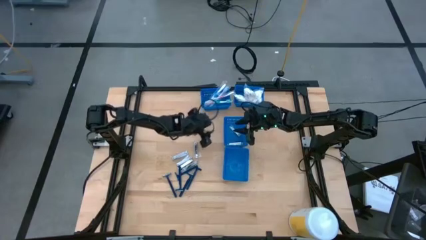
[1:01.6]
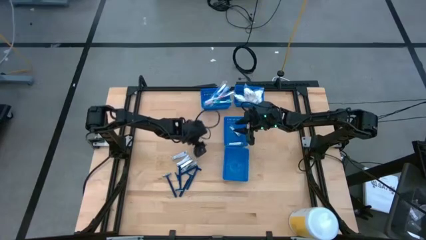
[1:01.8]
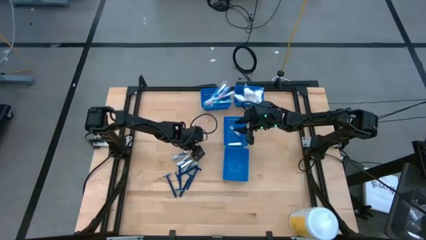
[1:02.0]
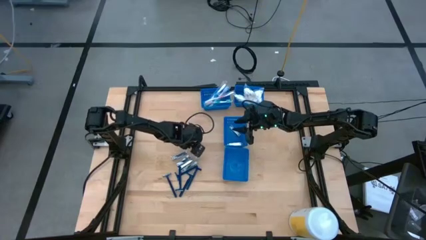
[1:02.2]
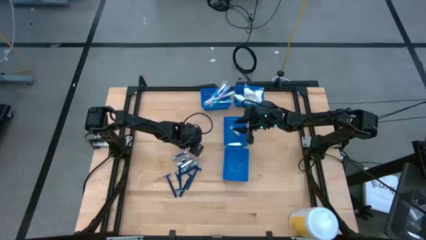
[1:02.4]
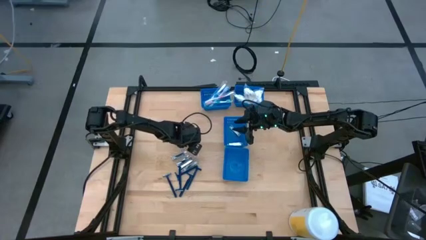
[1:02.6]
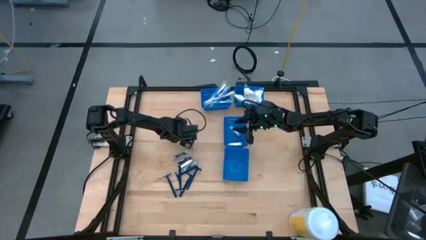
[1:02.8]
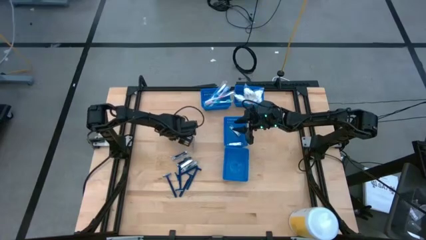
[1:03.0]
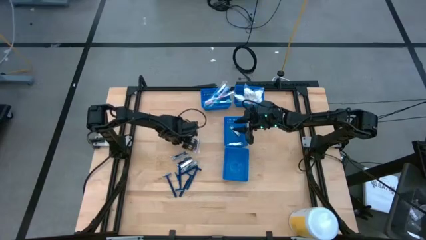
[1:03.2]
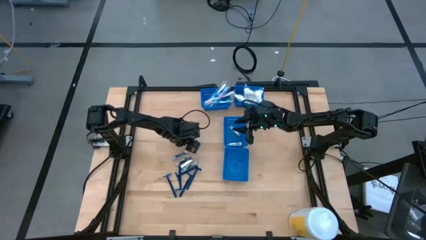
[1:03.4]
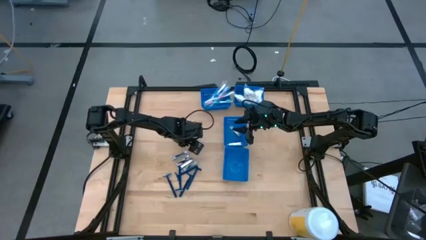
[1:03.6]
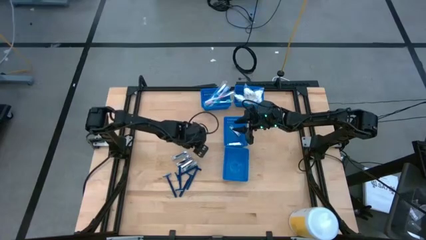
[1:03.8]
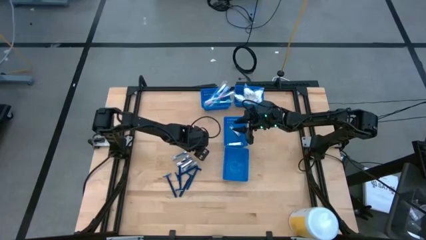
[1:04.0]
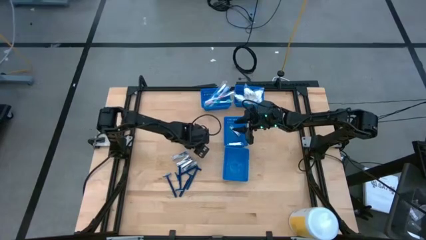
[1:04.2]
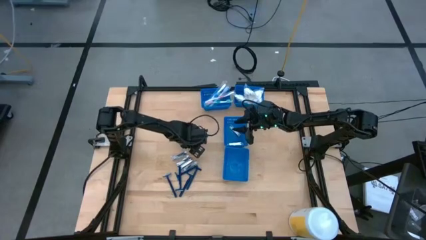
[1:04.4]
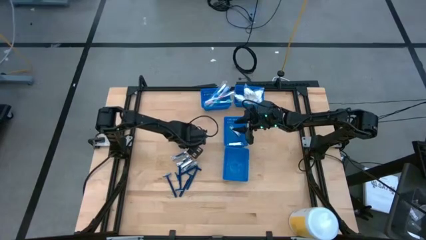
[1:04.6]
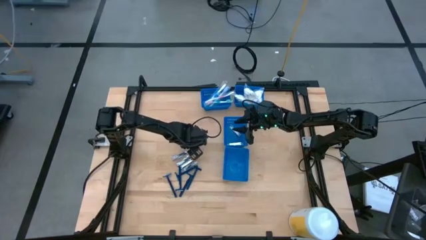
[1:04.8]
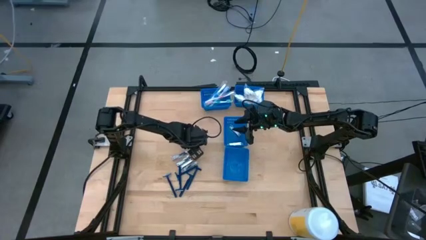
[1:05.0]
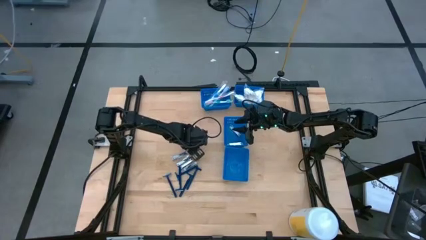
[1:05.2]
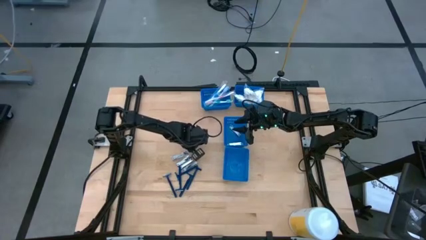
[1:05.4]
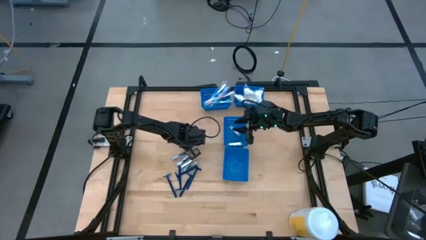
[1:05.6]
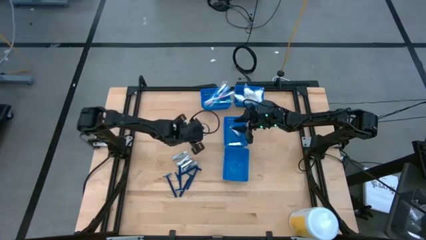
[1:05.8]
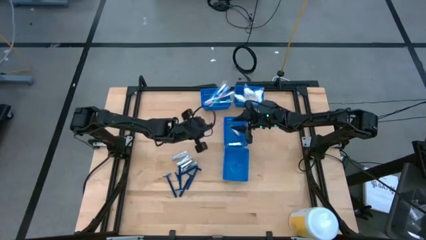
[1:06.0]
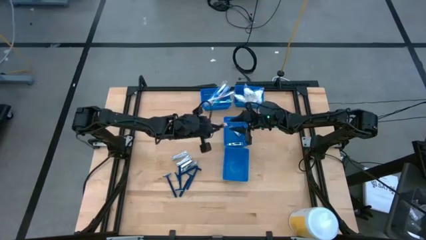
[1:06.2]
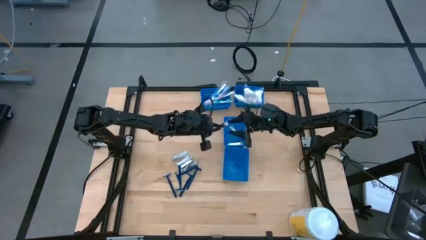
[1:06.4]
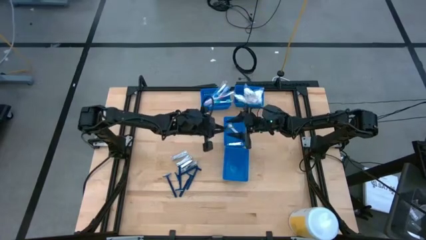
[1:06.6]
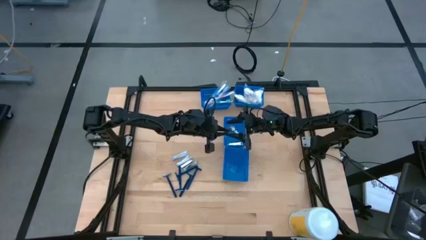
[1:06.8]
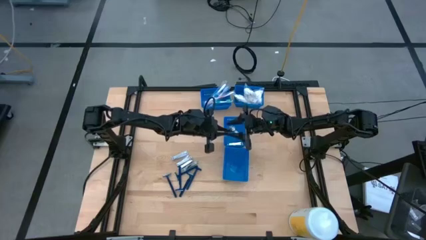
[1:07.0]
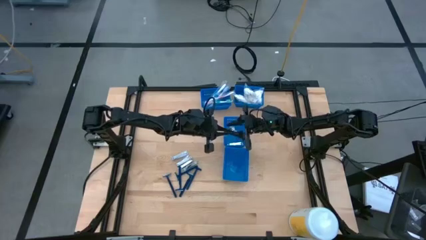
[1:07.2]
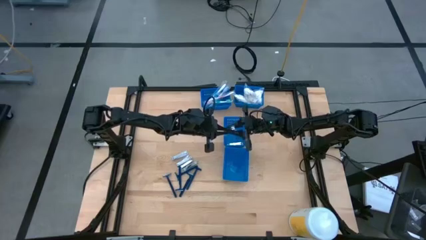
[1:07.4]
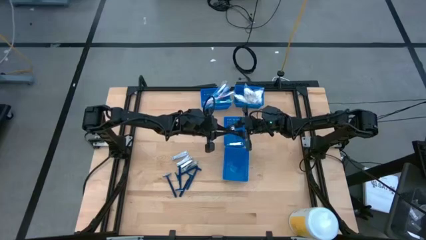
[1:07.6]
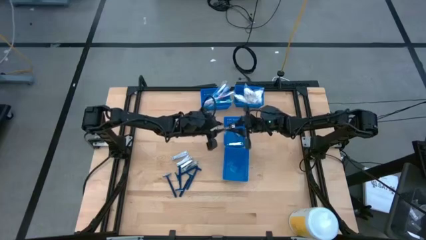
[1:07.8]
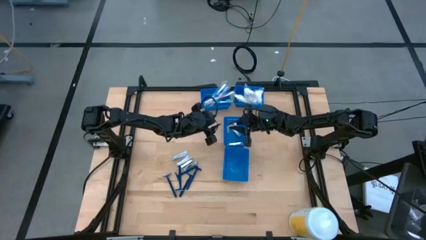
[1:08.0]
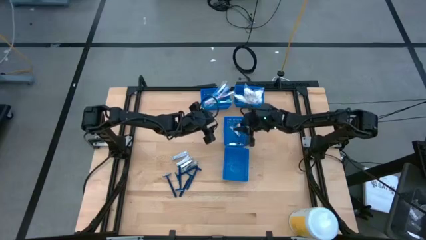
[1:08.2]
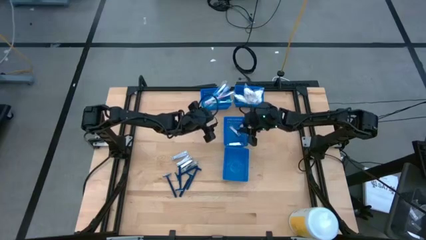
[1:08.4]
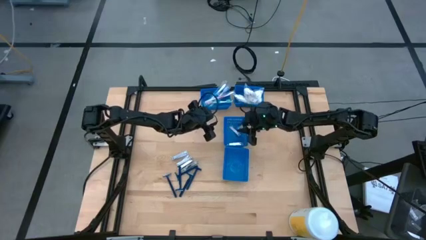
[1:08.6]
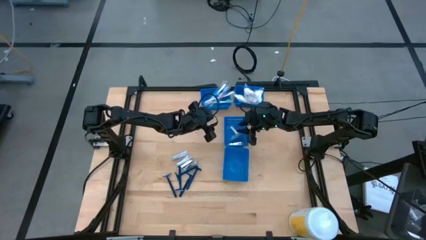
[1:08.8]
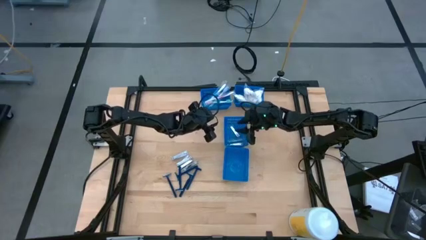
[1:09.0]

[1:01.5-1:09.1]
Task: Pick & Place Travel size toiletries
Put the nail clipper into the center blue bin

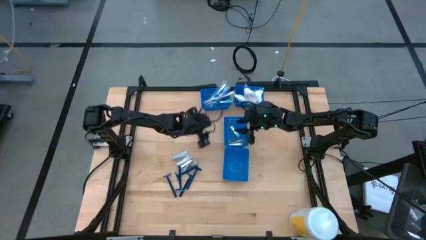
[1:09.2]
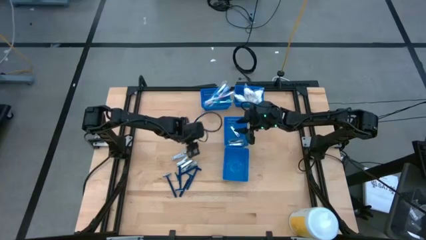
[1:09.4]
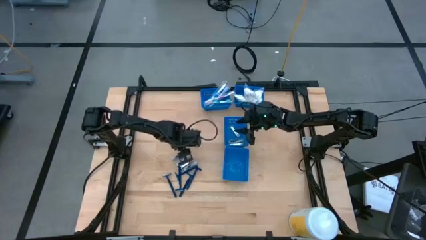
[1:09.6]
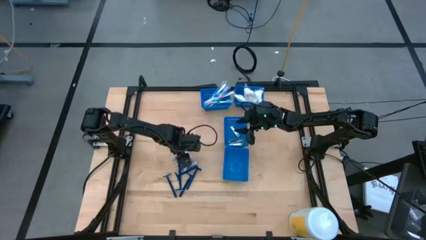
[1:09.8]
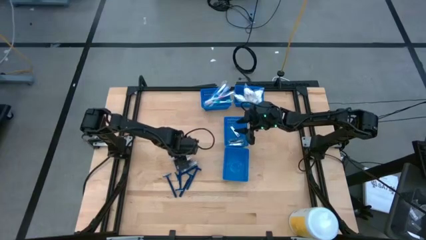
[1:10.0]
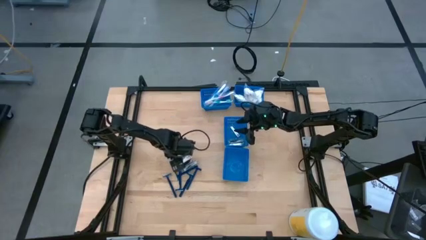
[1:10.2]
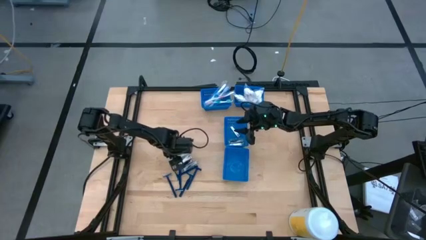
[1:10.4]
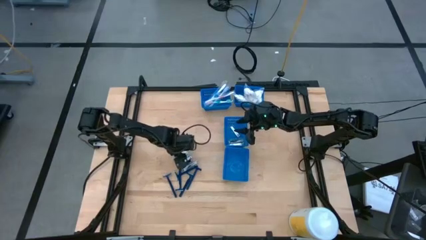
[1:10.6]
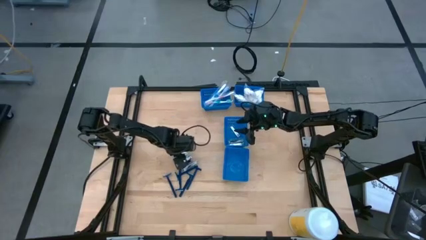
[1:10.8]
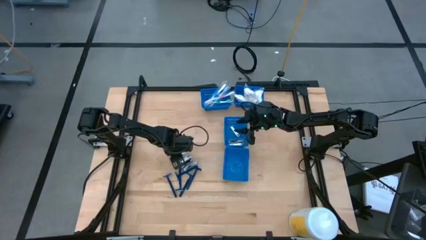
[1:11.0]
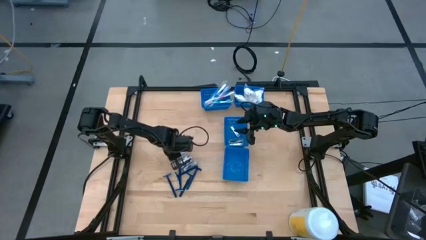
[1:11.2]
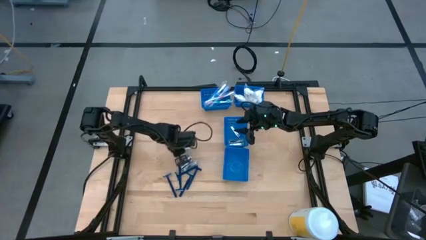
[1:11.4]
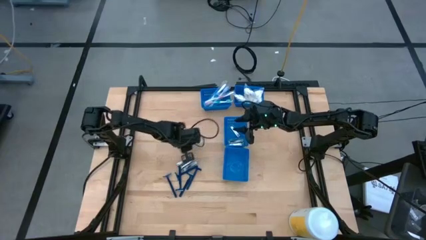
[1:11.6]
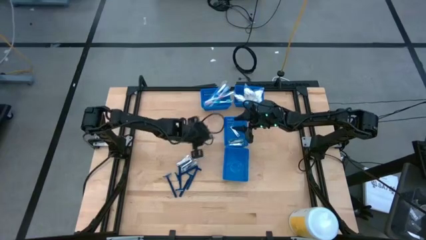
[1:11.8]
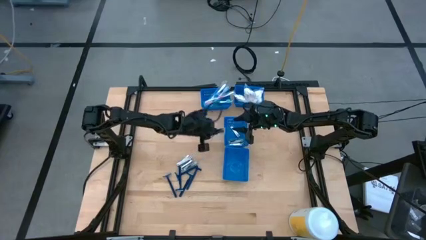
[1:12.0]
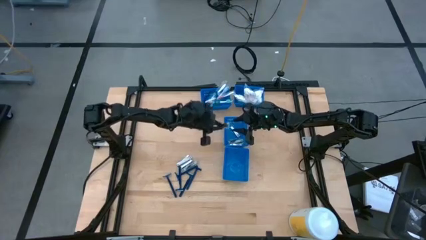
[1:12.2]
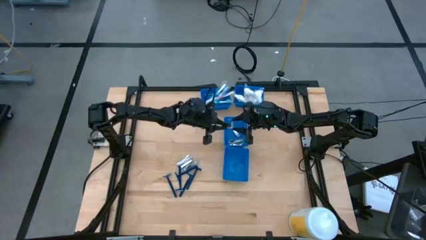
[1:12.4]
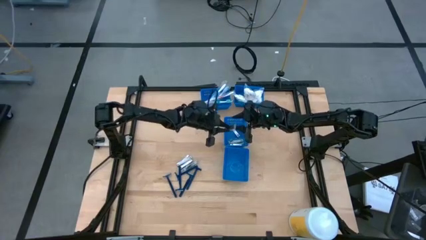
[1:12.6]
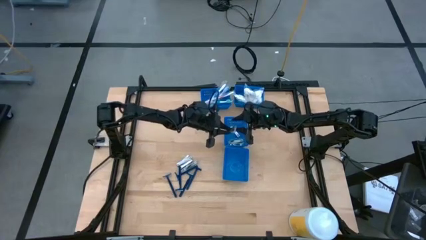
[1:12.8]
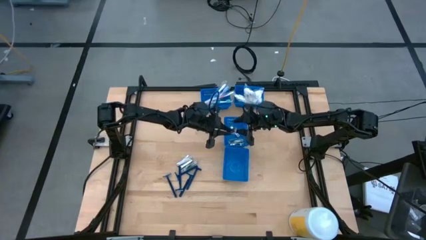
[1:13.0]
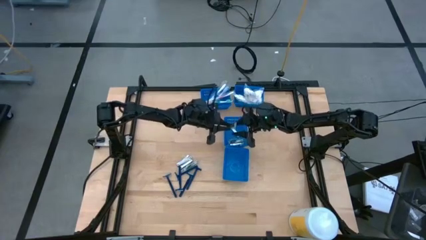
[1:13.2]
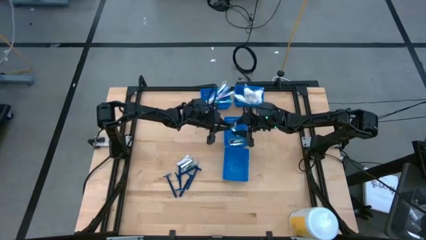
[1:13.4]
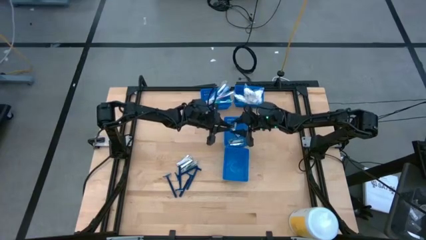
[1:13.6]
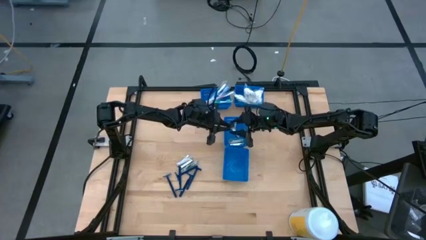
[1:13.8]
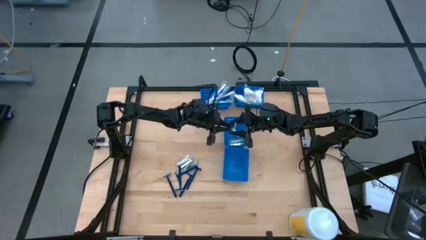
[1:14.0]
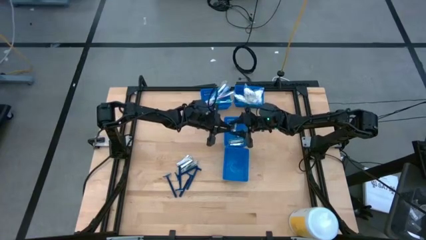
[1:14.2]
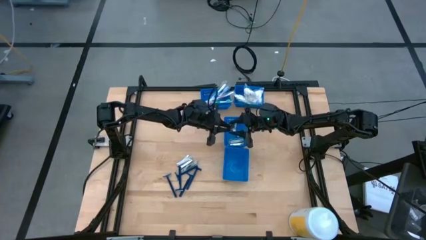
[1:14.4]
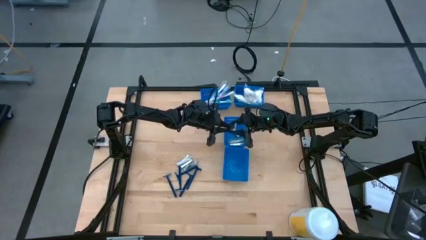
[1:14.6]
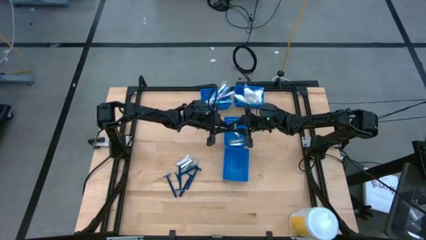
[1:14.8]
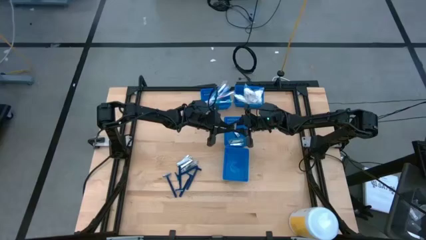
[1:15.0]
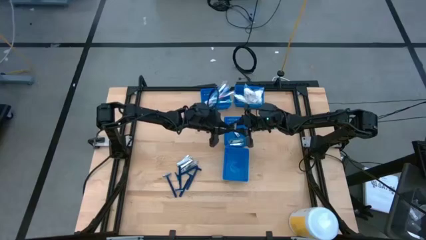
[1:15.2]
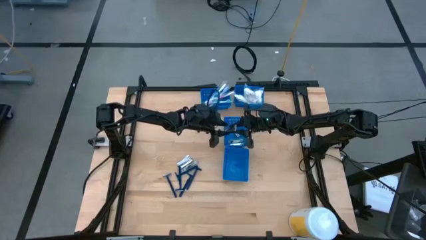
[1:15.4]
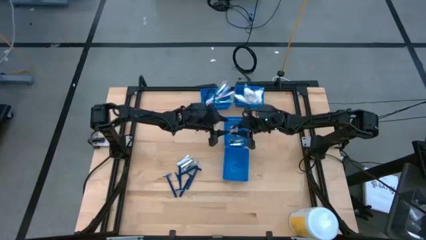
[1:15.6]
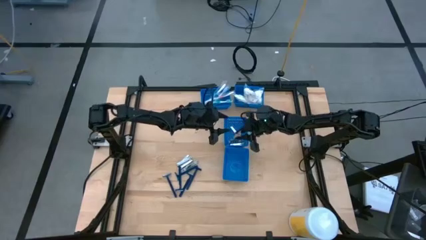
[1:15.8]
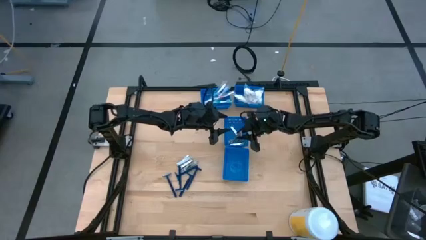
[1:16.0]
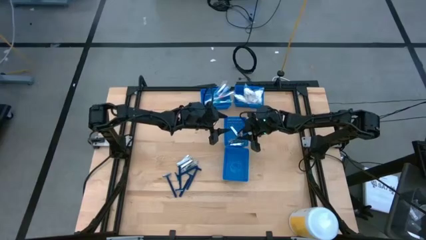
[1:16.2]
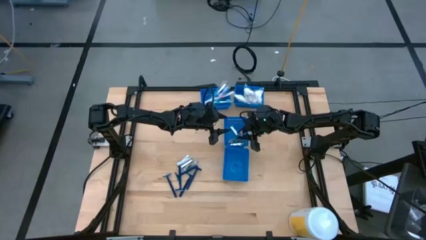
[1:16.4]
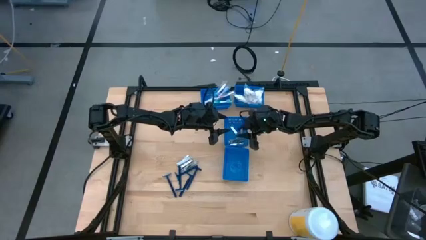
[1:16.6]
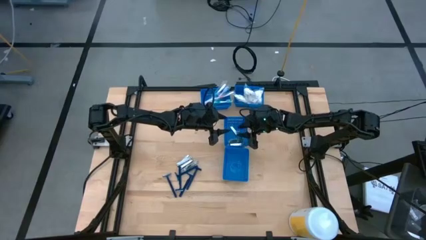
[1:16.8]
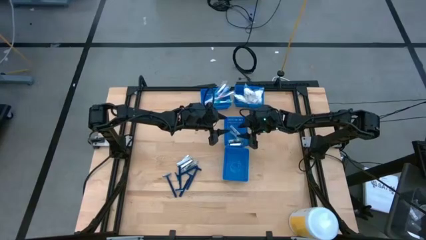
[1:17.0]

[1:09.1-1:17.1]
Put the nail clipper into the center blue bin

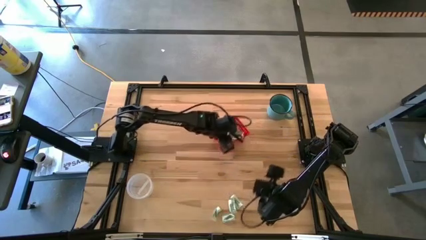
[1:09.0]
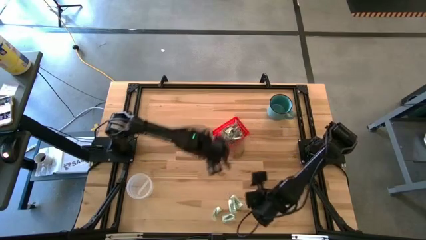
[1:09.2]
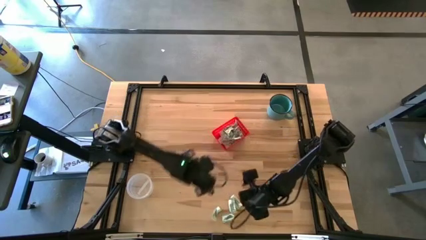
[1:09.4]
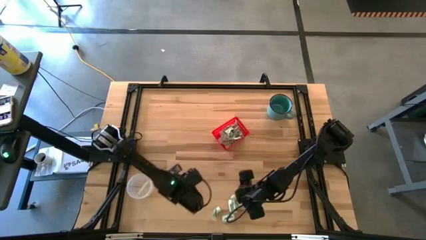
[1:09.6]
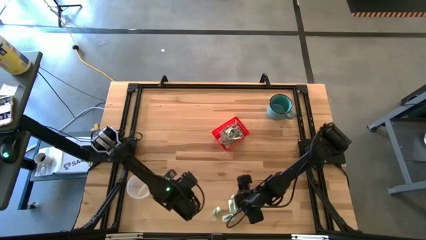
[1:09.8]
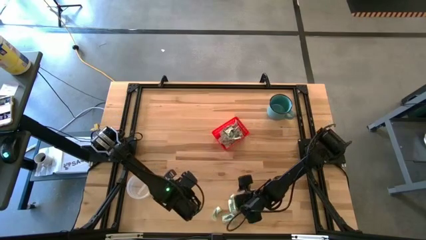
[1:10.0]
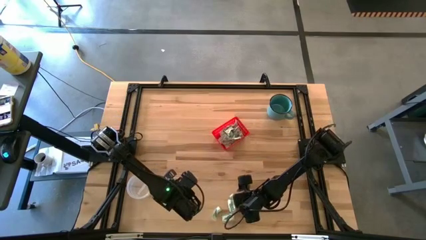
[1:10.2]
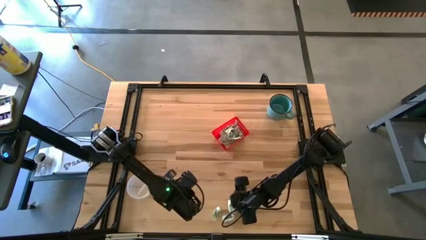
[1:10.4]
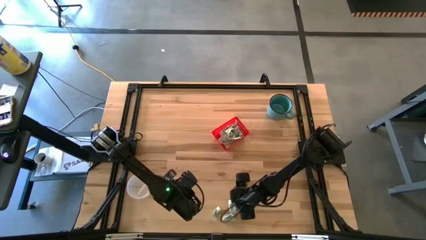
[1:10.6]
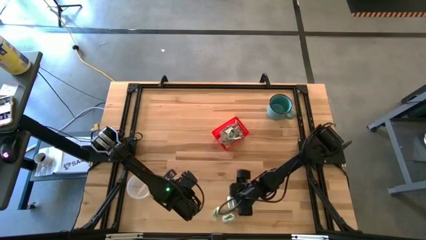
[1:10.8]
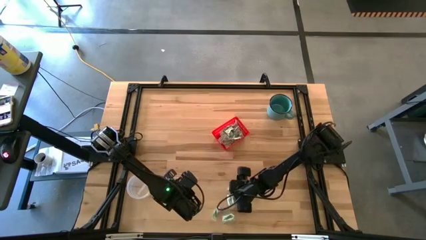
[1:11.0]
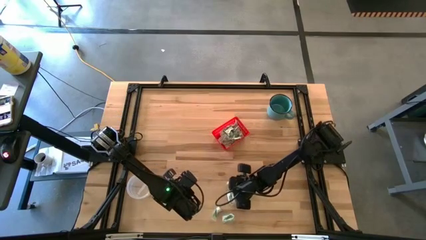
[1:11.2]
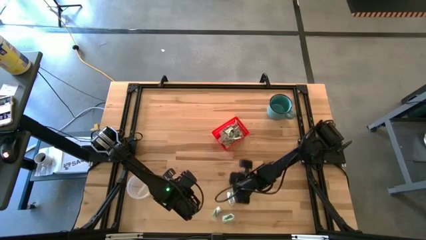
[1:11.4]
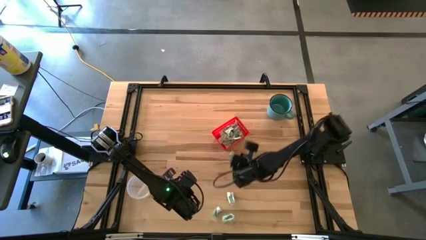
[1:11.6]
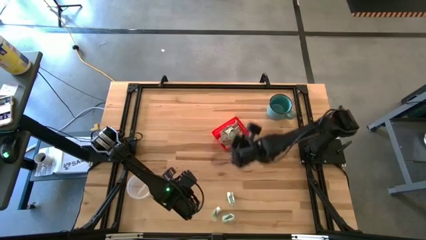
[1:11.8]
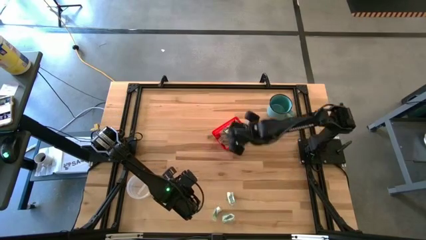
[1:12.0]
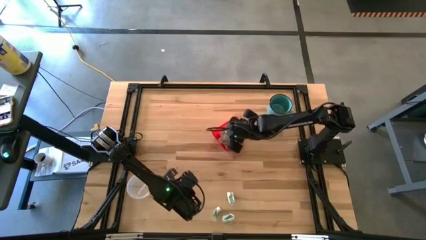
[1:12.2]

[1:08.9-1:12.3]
Task: Pick and place items into bin
Put the stevia packet into the red bin
